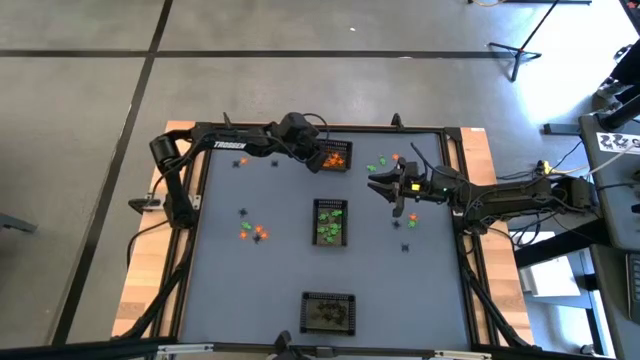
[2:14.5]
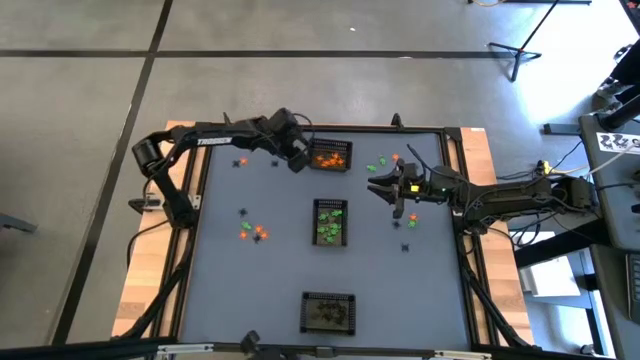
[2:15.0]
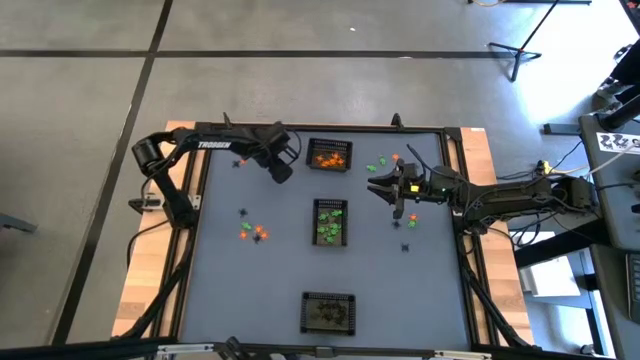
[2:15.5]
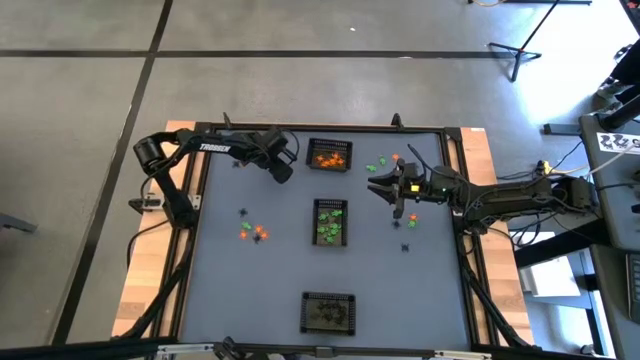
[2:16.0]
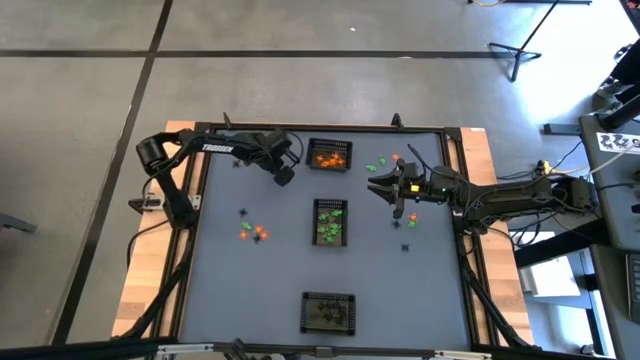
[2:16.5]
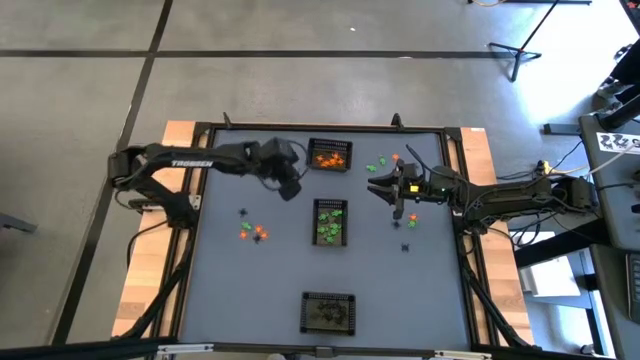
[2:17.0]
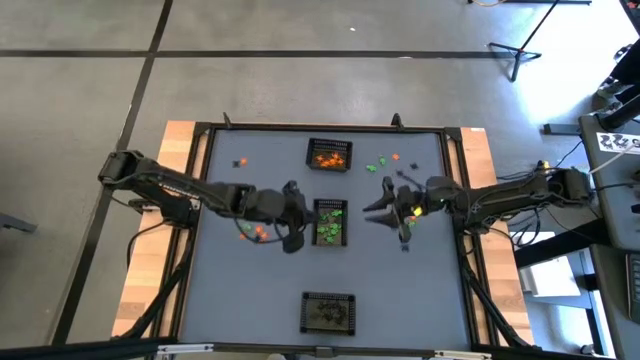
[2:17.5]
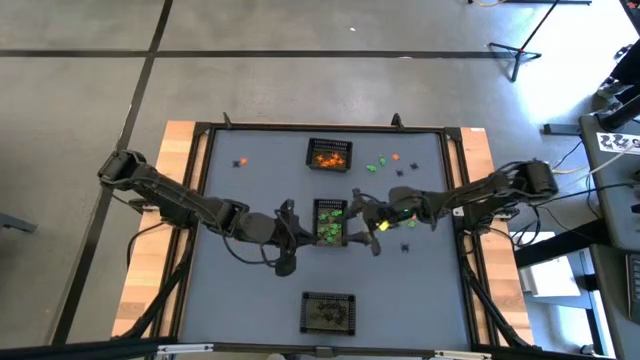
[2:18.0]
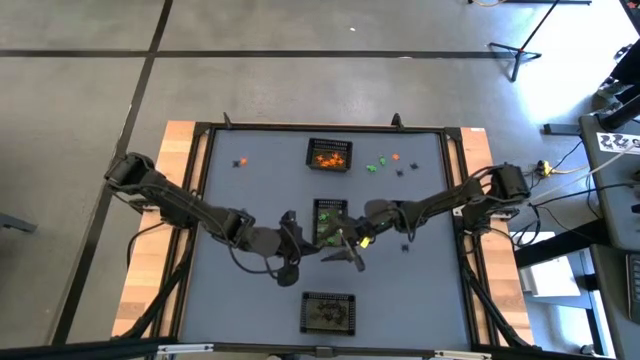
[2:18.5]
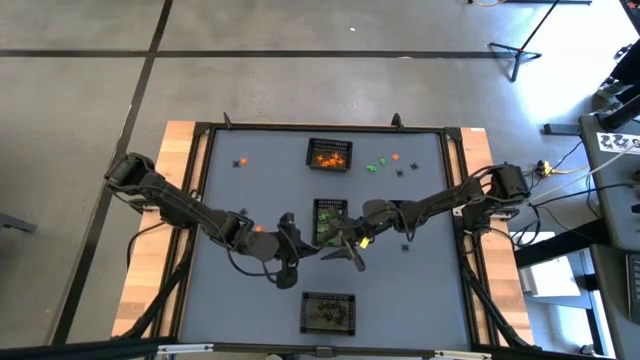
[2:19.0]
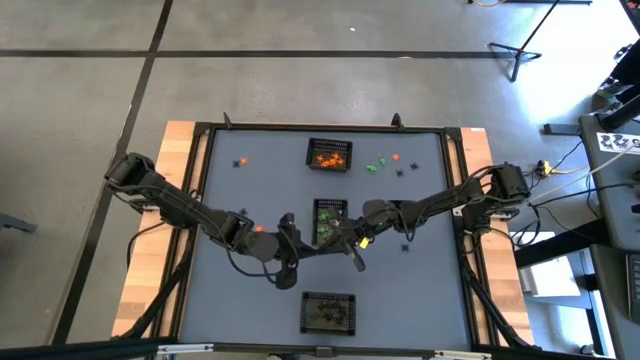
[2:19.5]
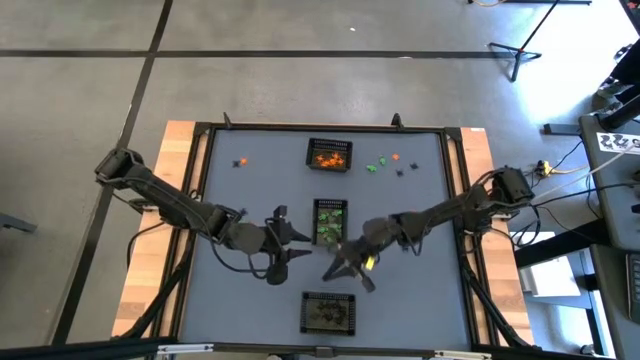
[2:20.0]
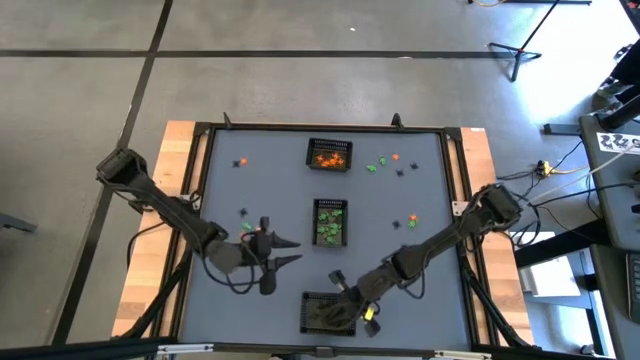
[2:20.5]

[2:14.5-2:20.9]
Task: Sort Halloween decoration
Put the black spider toy into the bottom black bin

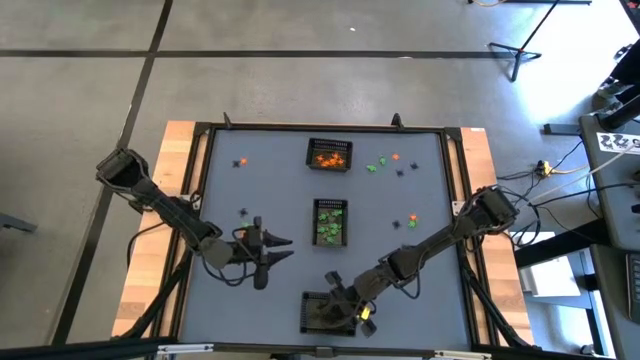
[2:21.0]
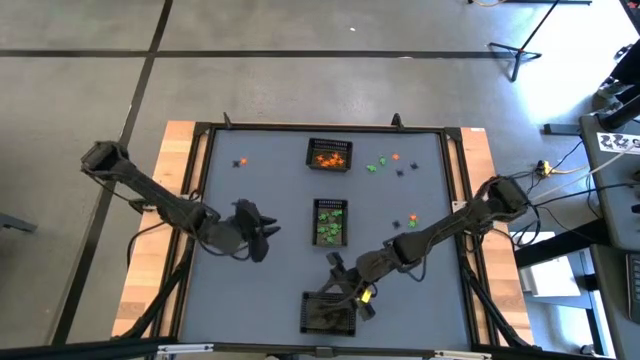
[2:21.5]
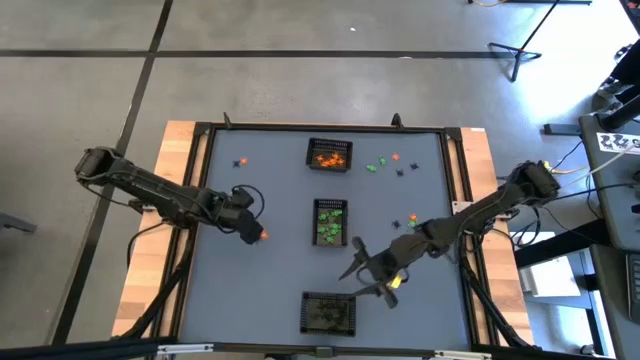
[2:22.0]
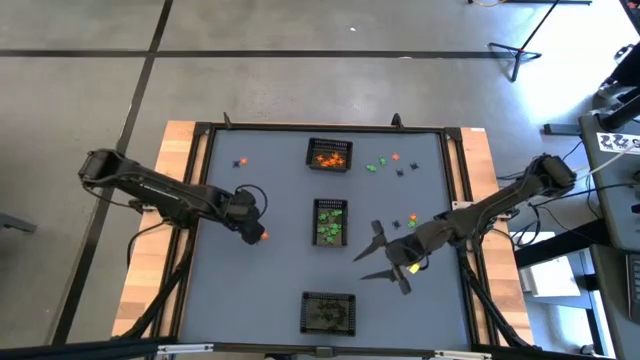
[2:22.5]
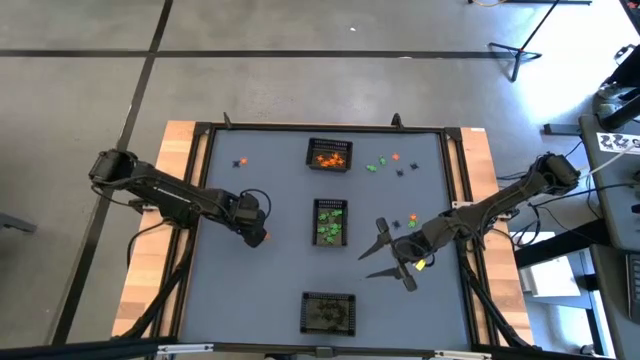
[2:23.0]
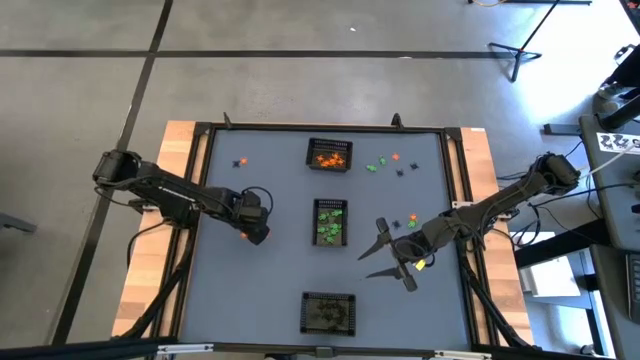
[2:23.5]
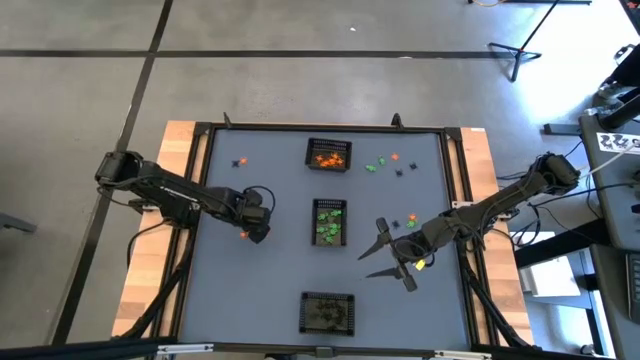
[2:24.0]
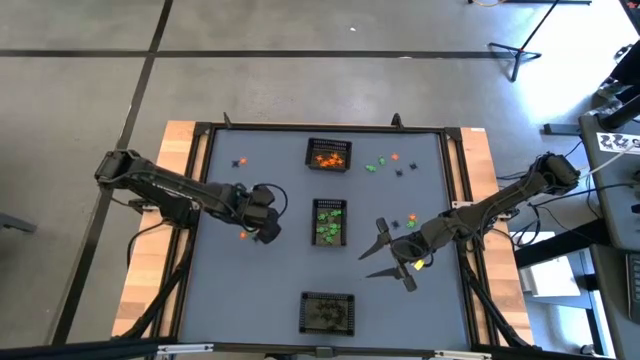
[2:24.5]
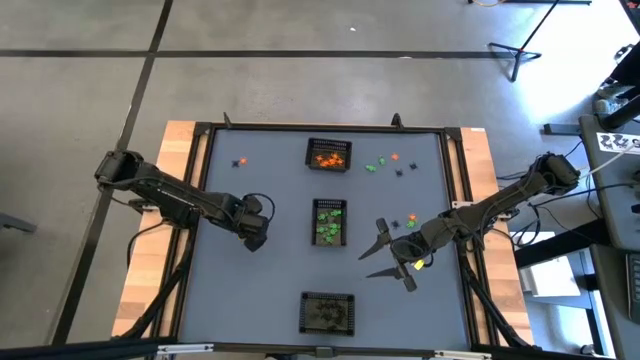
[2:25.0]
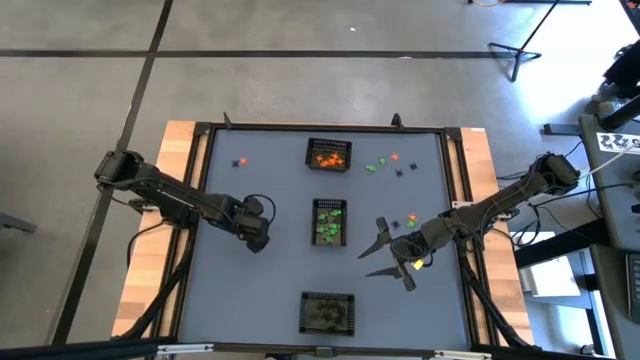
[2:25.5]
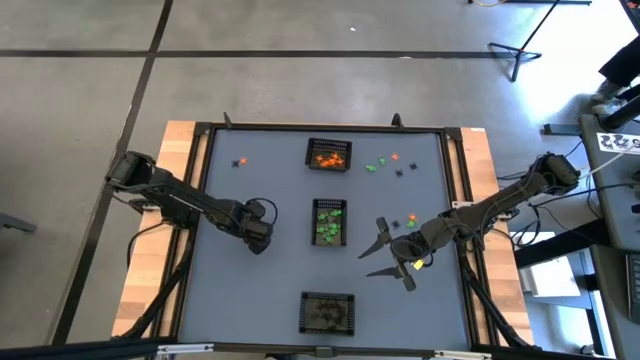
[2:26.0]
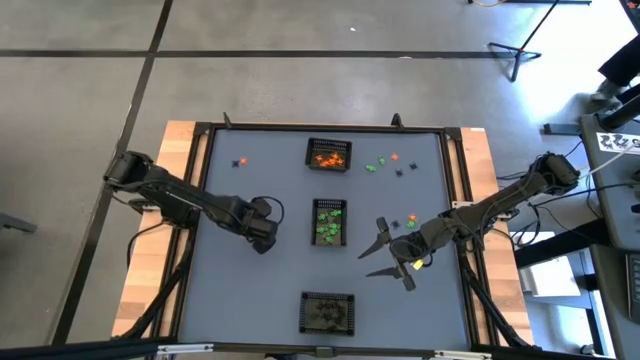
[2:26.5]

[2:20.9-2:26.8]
Put the green skeleton toy into the center black bin

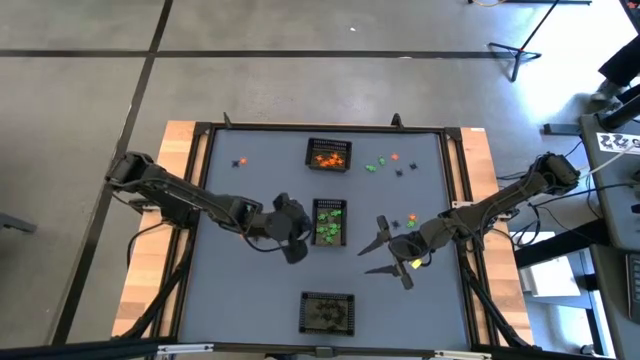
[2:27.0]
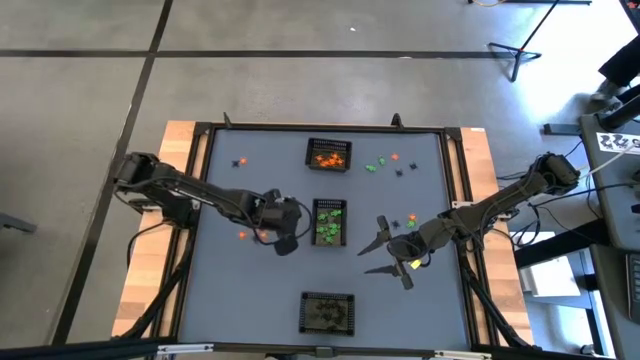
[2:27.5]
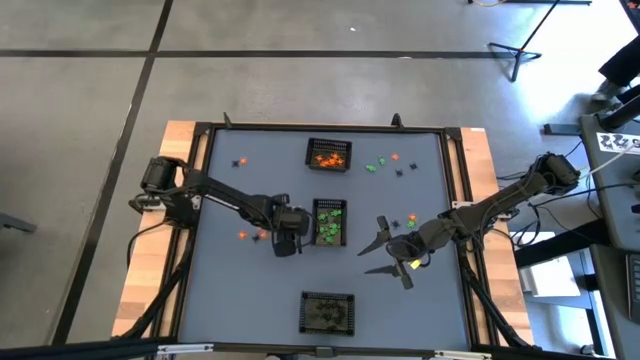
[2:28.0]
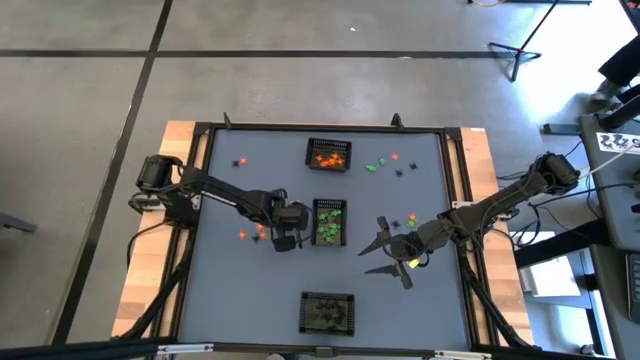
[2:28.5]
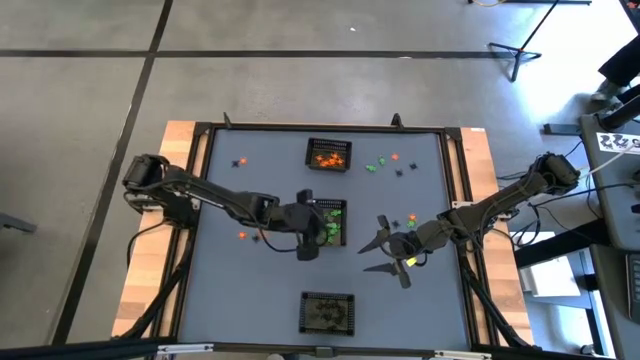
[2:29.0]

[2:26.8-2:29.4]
Put the green skeleton toy into the center black bin

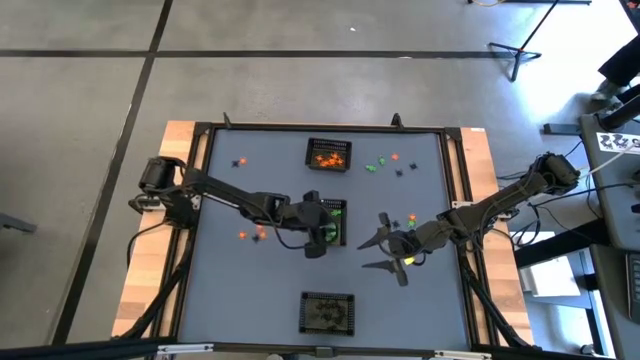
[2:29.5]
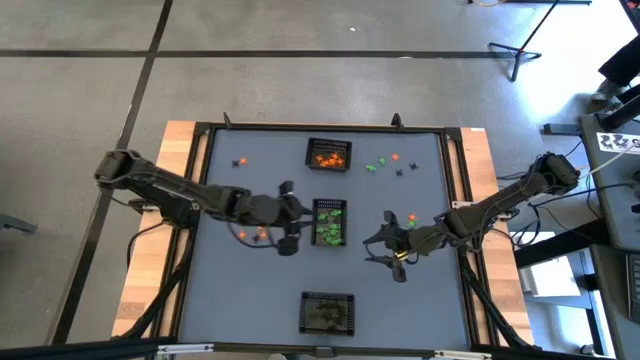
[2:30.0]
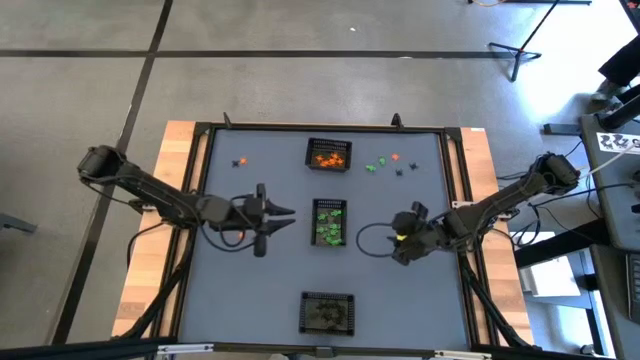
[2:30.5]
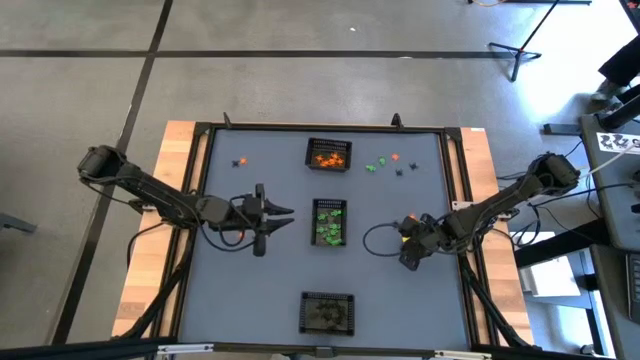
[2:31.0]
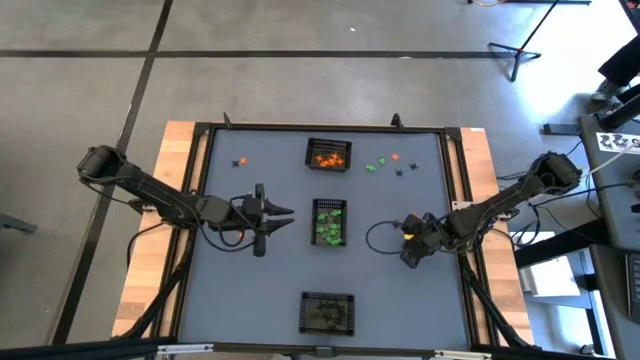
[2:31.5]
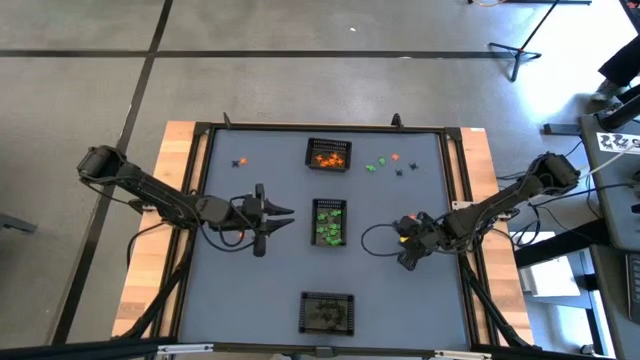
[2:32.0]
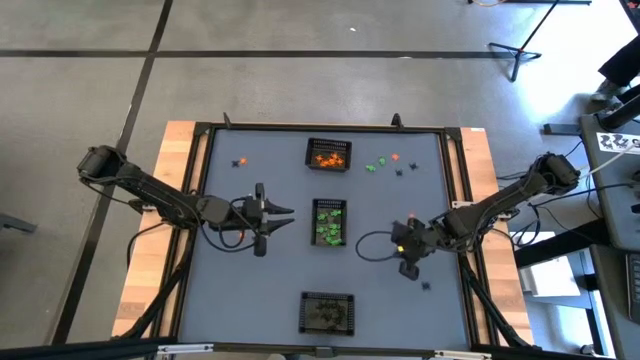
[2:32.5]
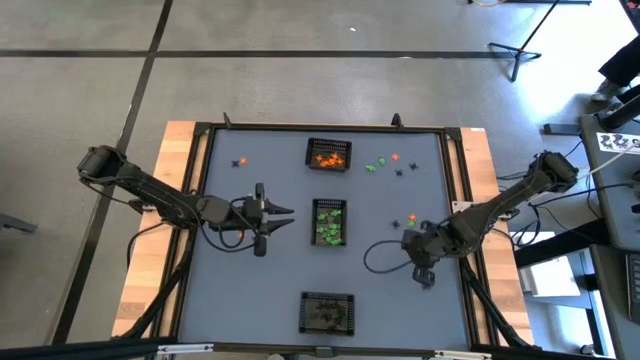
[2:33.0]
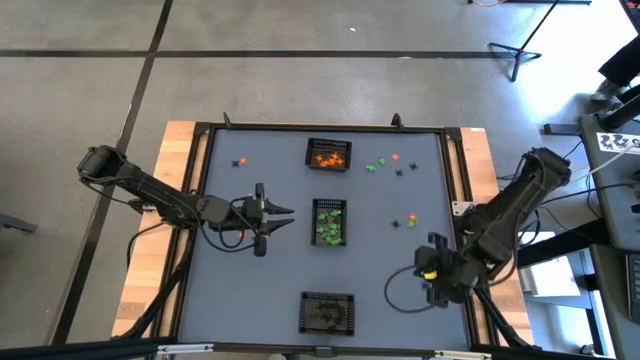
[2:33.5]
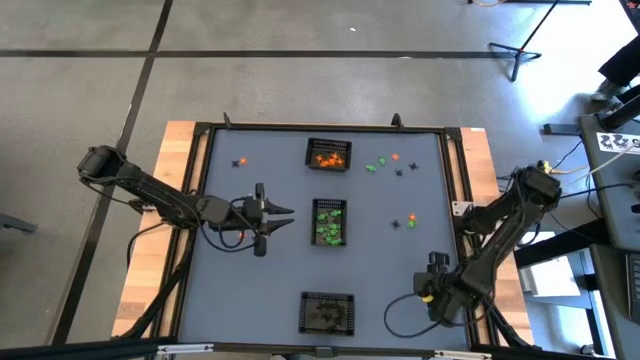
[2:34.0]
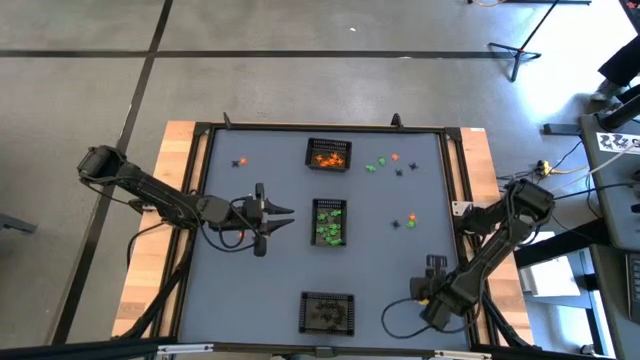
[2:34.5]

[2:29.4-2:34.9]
Put the black spider toy into the bottom black bin

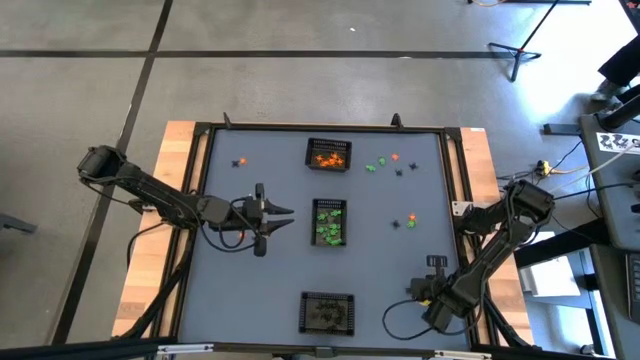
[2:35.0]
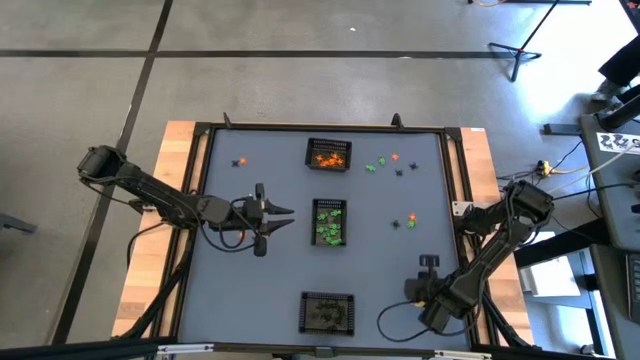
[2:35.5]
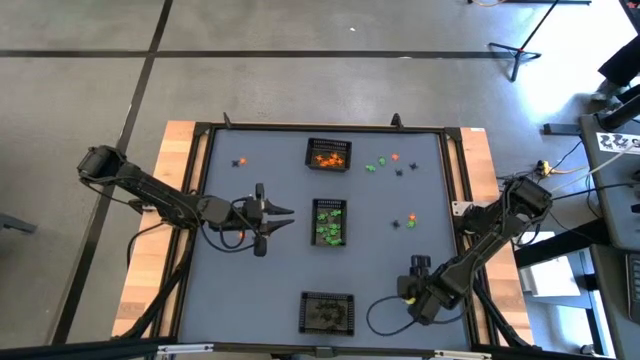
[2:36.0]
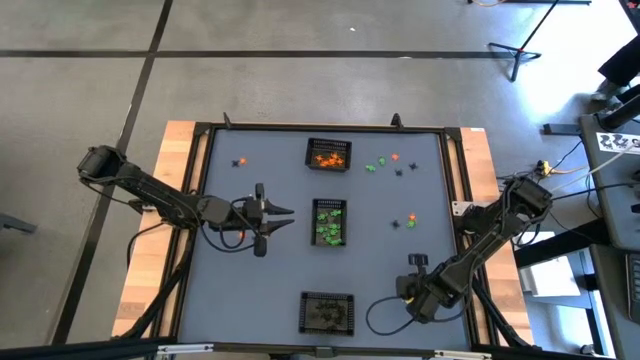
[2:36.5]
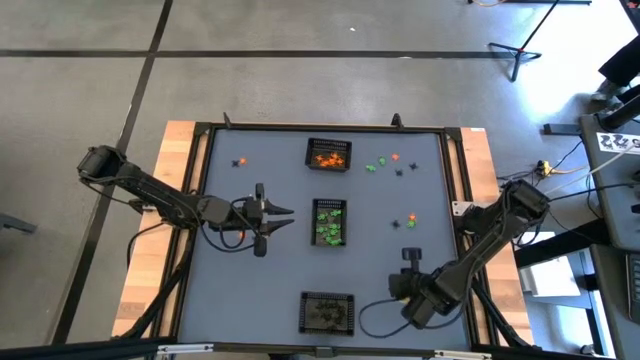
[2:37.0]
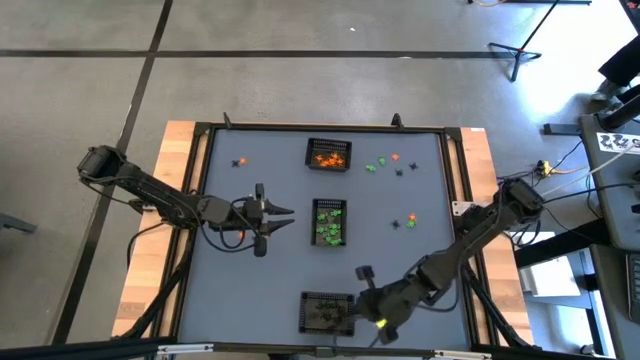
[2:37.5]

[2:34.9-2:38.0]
Put the black spider toy into the bottom black bin
